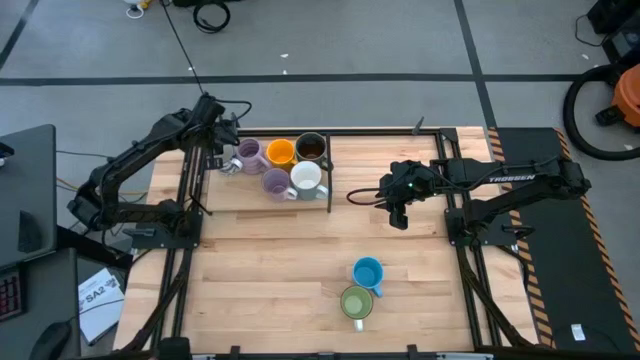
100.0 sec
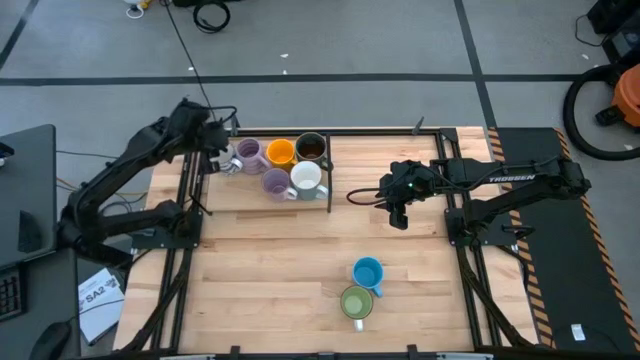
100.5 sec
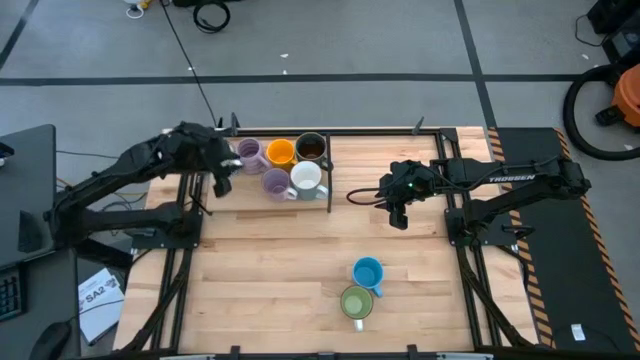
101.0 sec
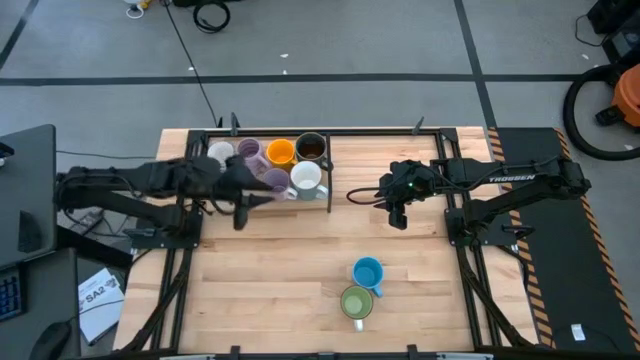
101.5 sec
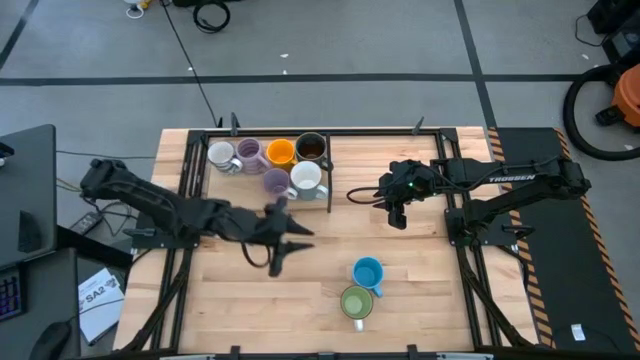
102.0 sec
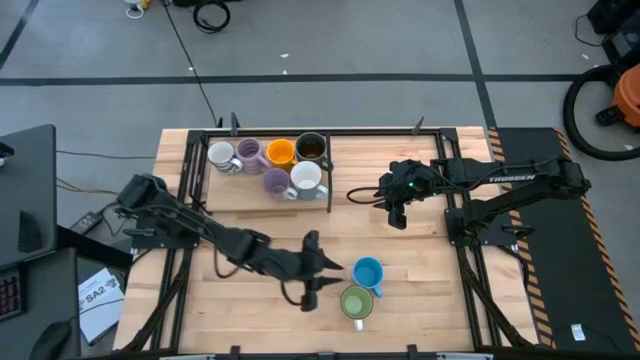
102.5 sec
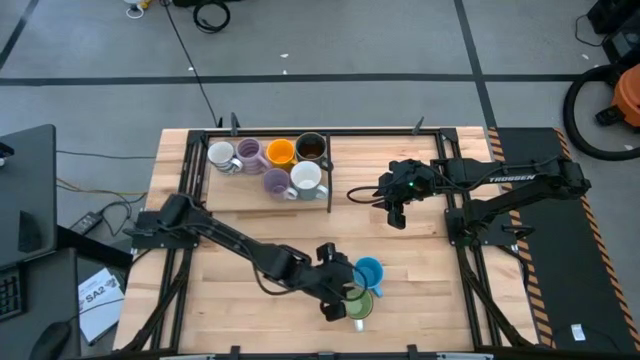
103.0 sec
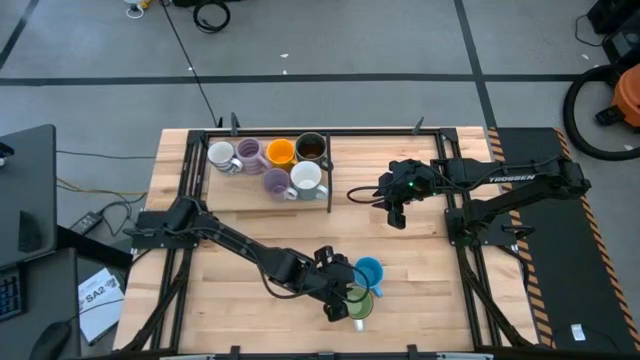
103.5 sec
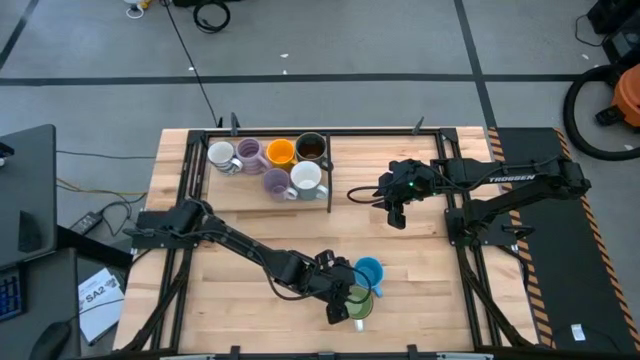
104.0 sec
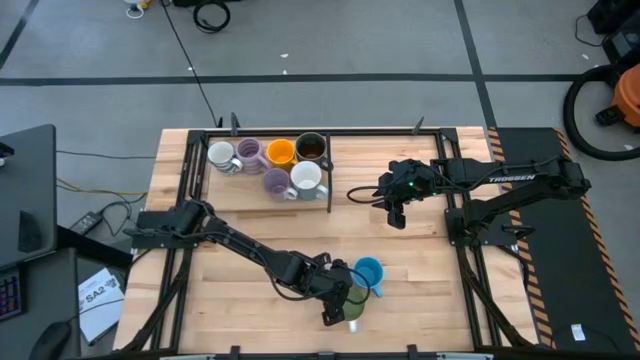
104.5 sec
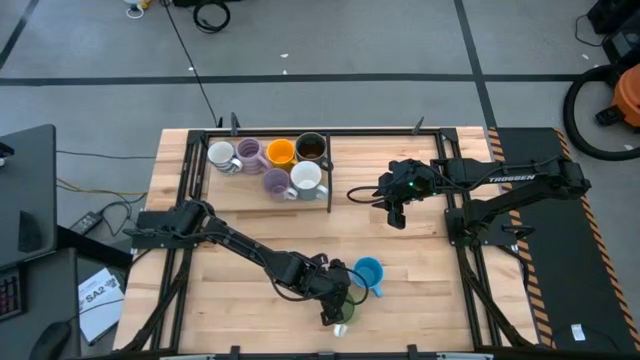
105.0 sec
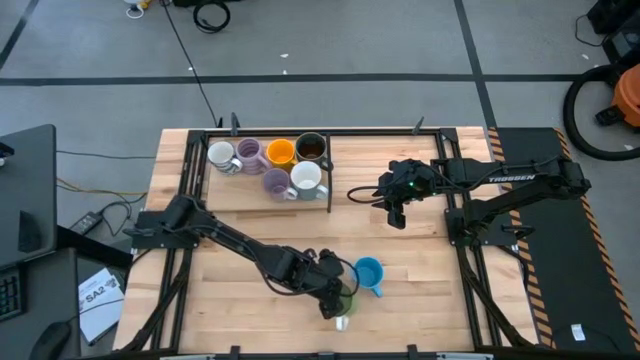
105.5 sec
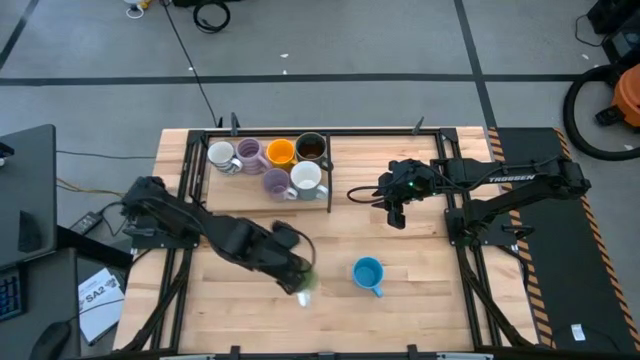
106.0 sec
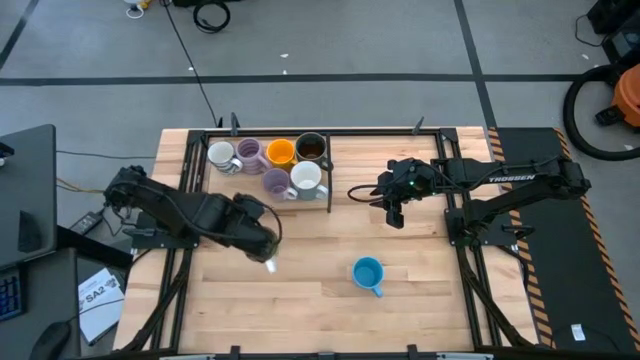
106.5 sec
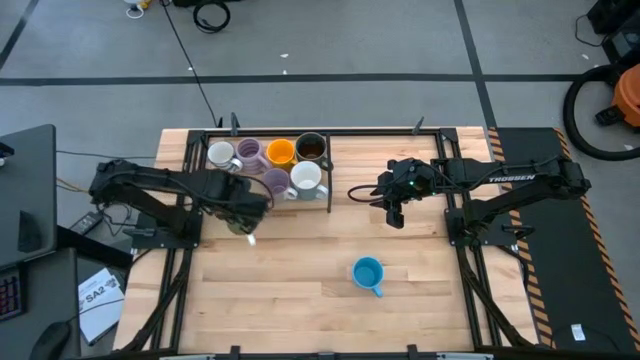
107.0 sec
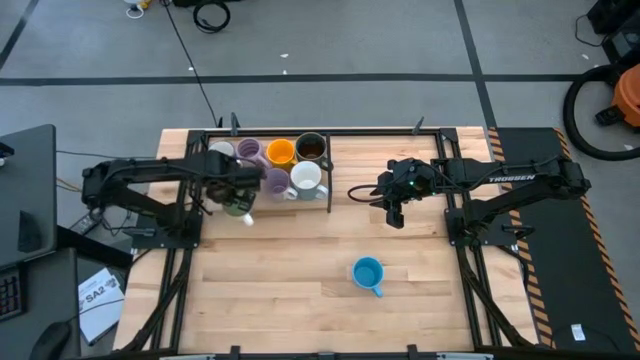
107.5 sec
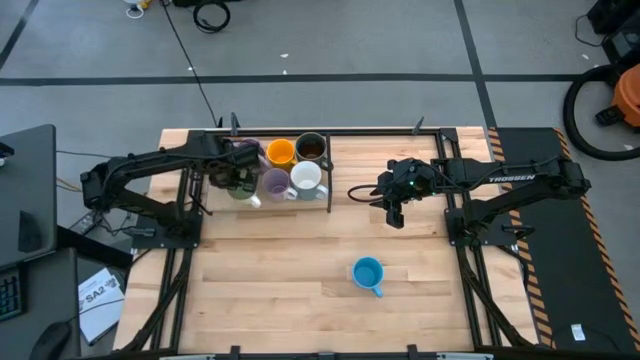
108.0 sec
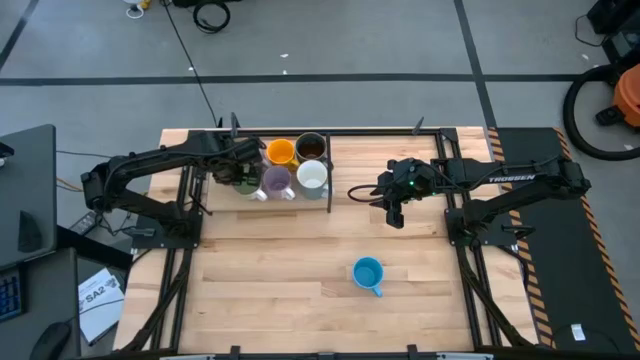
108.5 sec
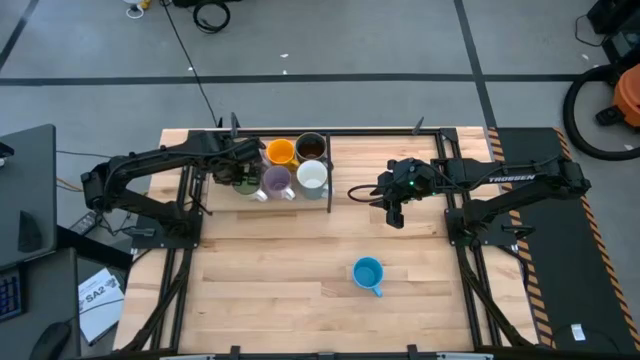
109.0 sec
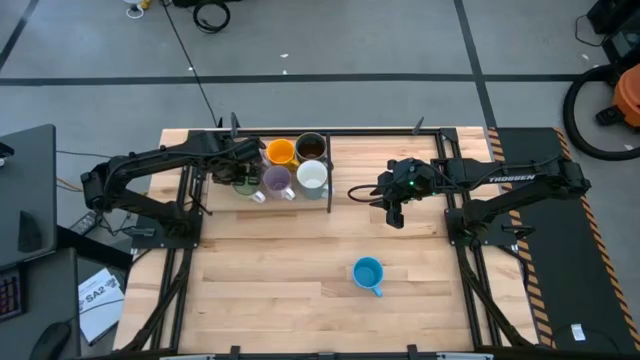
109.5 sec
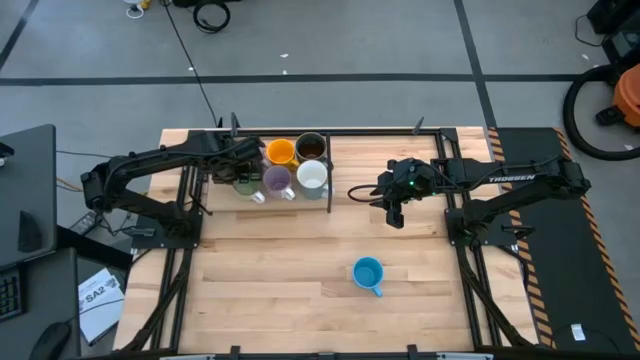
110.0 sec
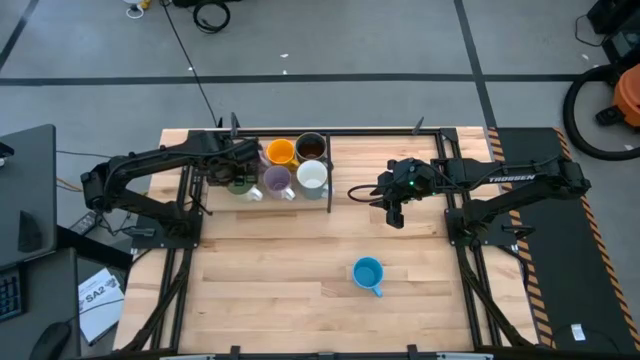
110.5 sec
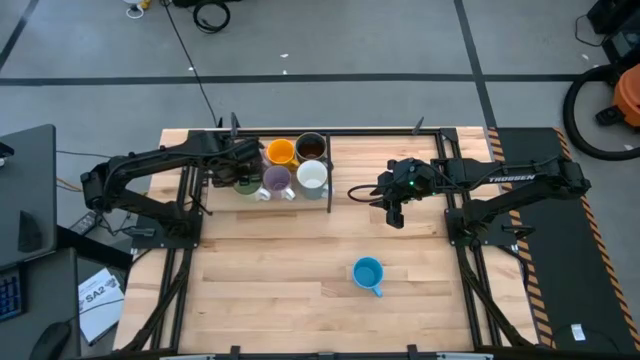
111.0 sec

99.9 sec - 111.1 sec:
Task: Place coffee mugs
Put the green mug on the shelf

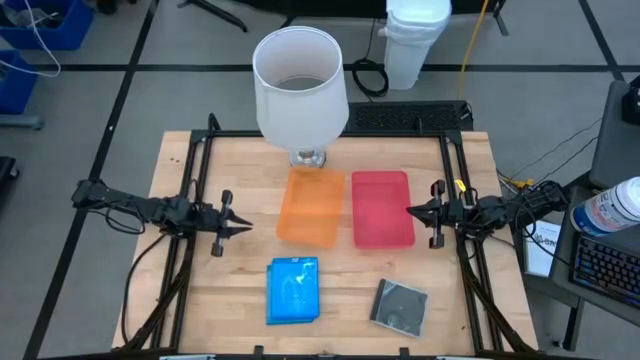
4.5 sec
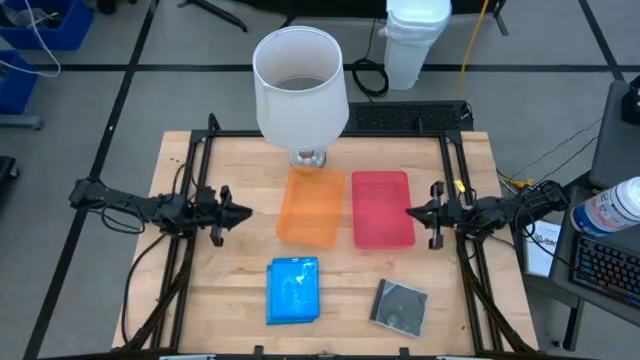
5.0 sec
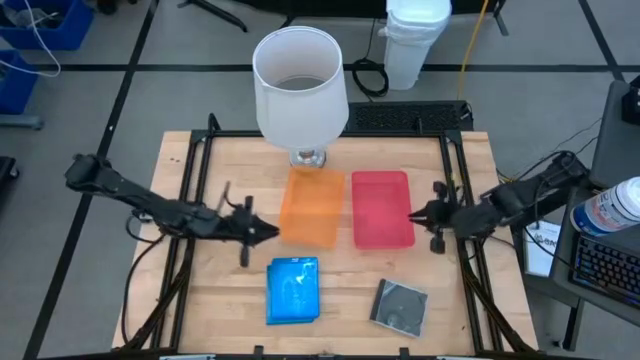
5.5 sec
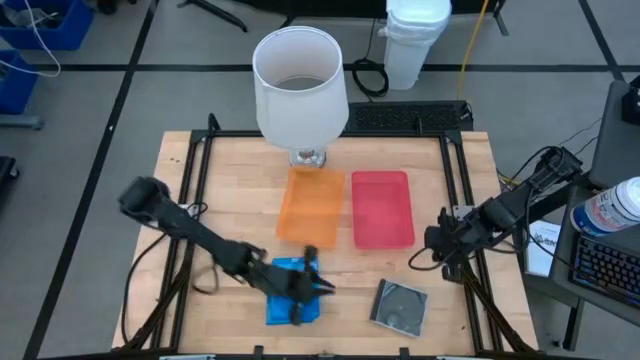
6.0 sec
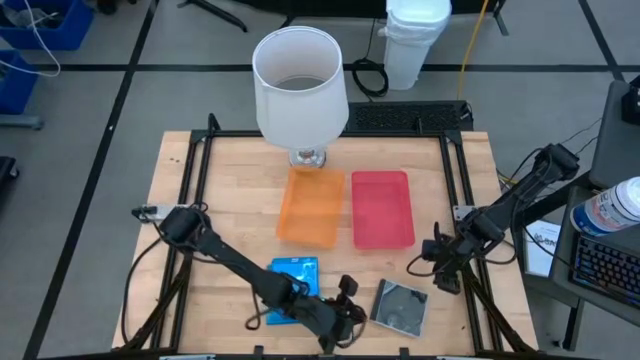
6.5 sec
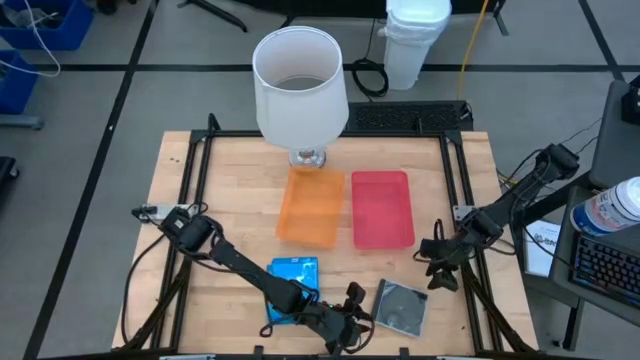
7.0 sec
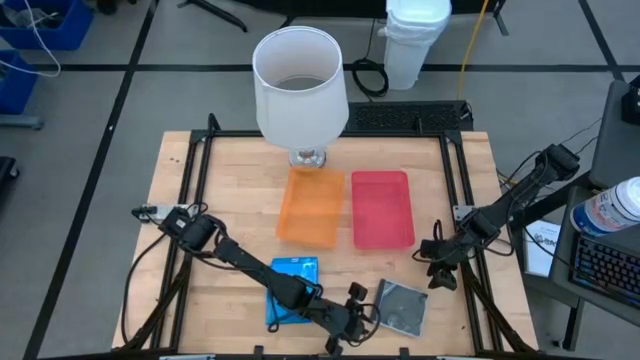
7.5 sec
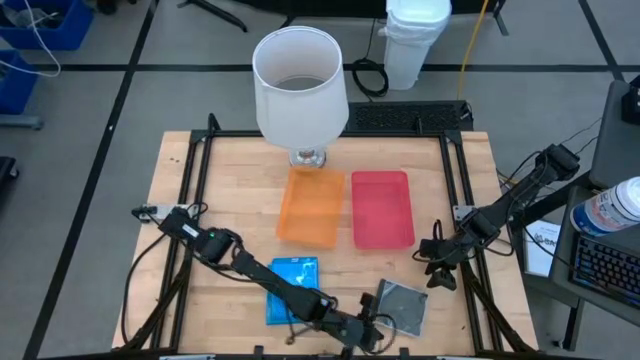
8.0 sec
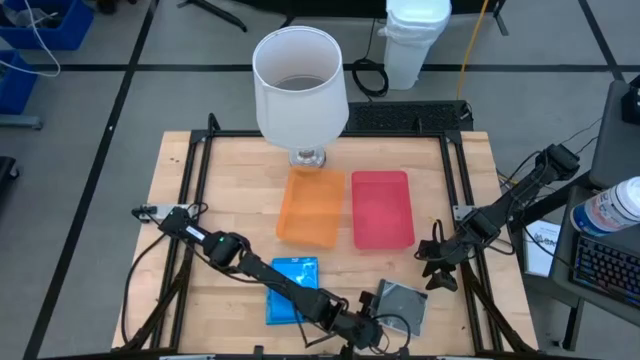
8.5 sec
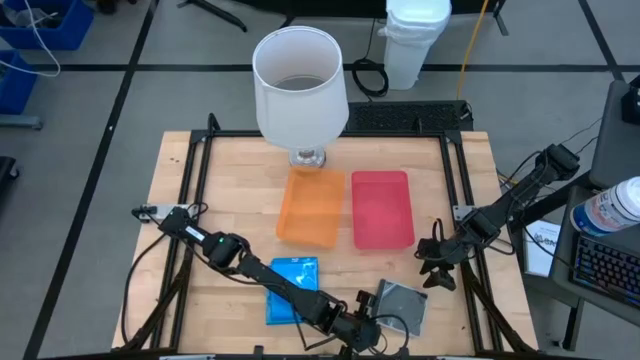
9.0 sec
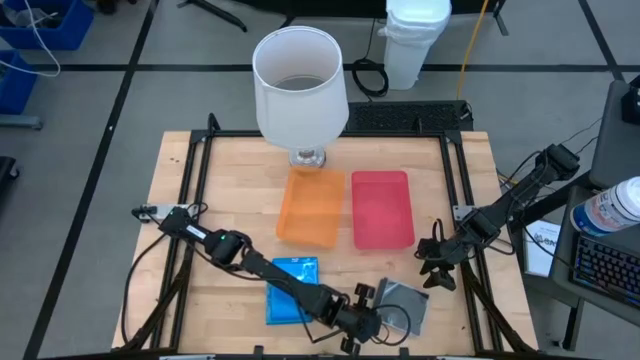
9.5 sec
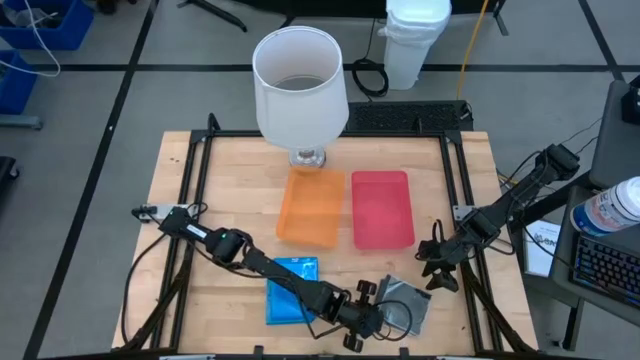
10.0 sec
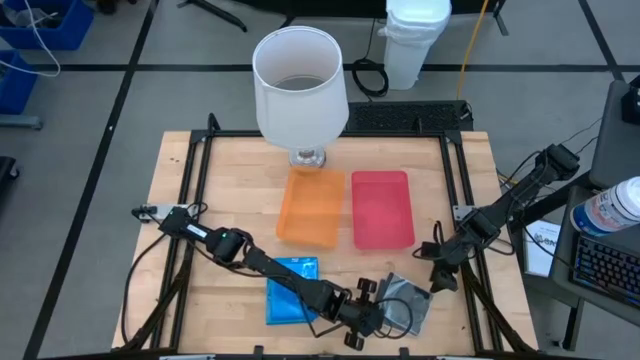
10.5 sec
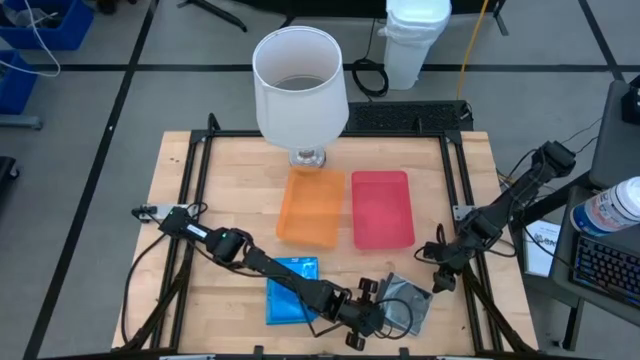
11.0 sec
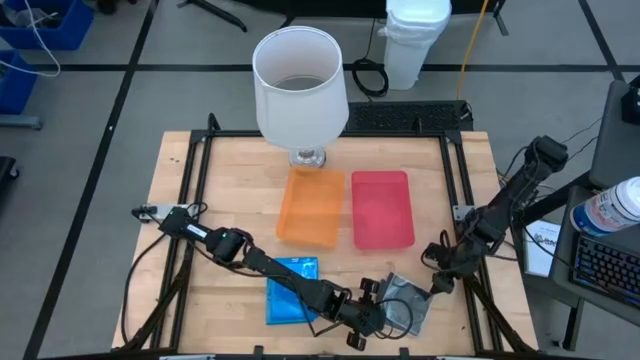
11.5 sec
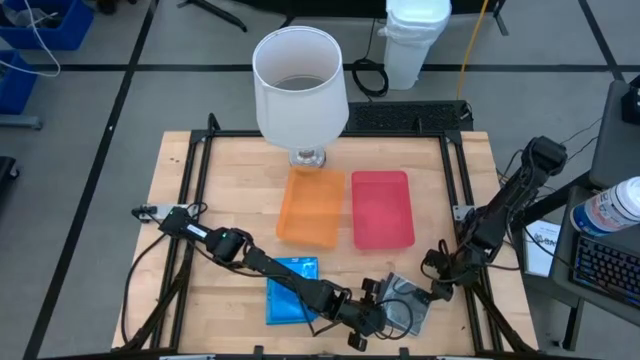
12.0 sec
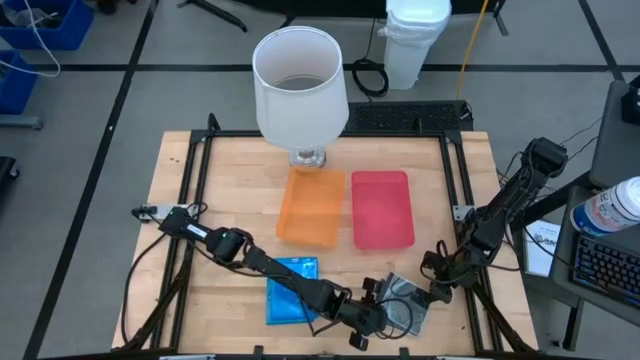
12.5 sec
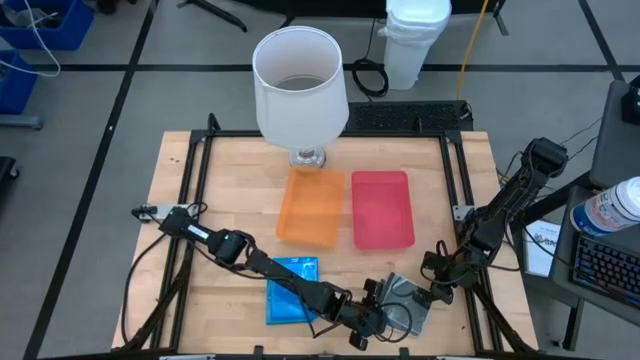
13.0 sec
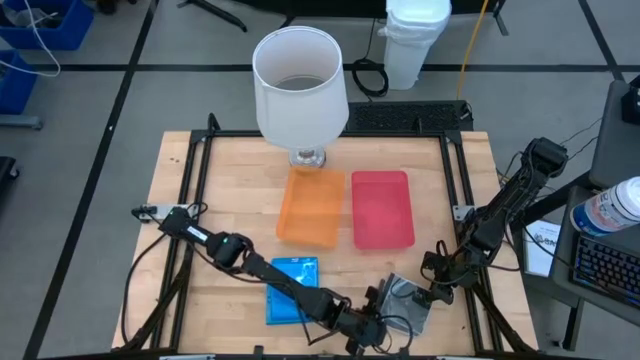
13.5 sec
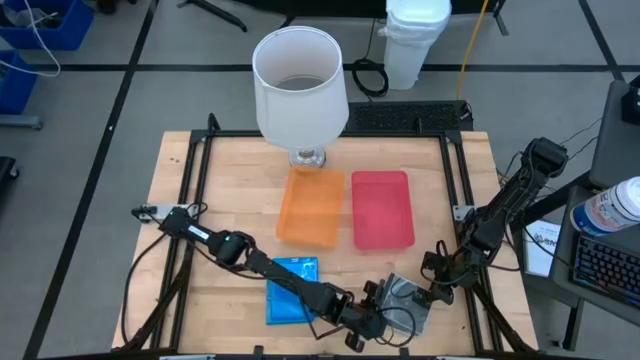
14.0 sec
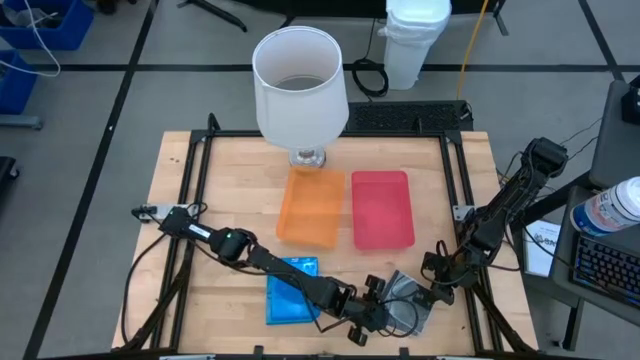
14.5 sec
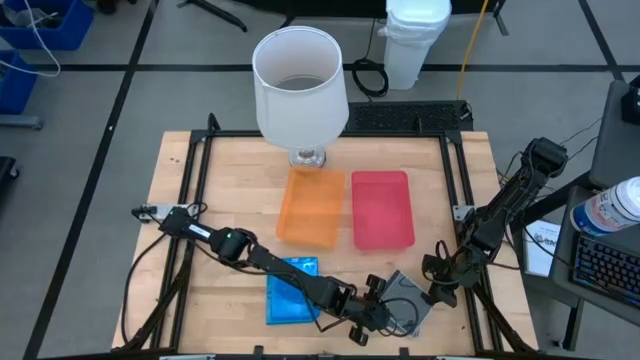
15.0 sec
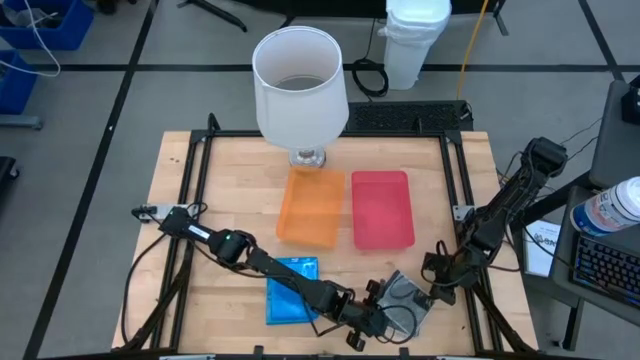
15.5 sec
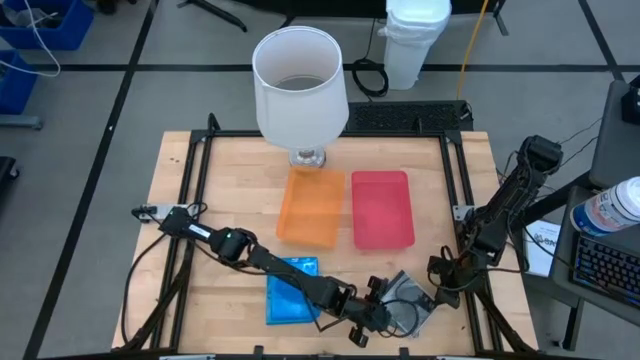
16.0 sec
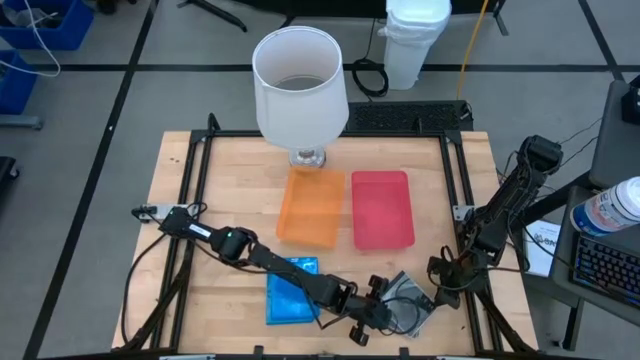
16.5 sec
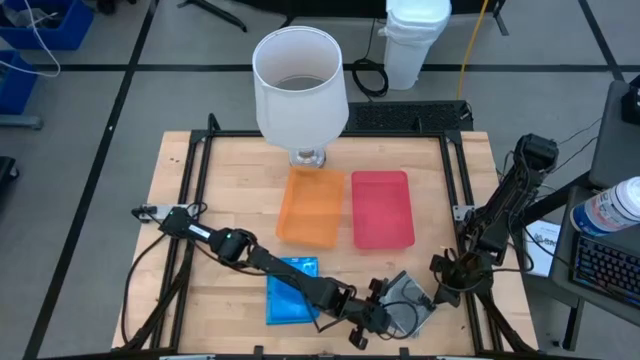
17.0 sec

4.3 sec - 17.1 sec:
Task: Pick & place jewel cases by type
Put the black CD case into the red bin
